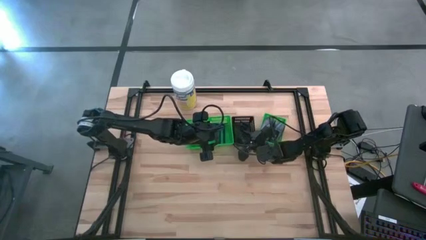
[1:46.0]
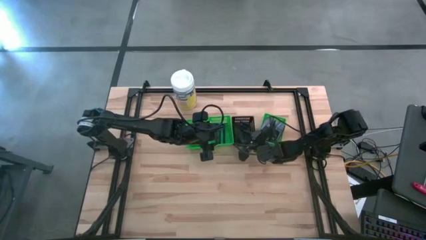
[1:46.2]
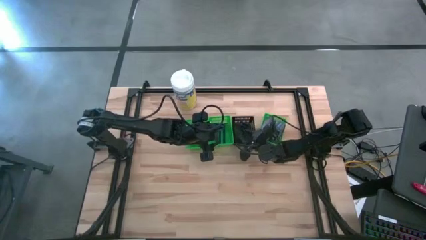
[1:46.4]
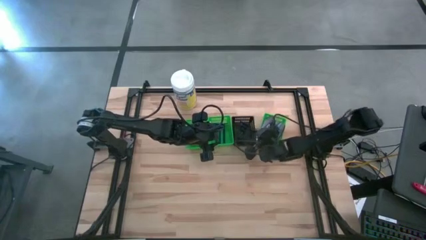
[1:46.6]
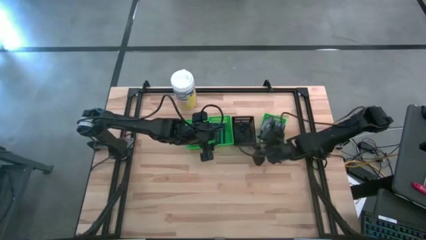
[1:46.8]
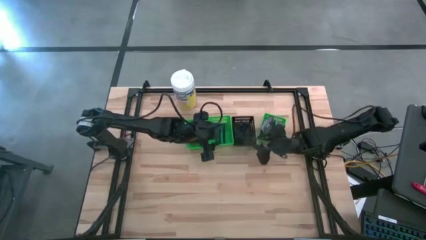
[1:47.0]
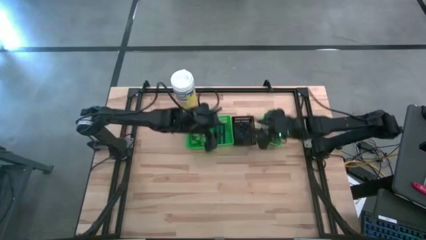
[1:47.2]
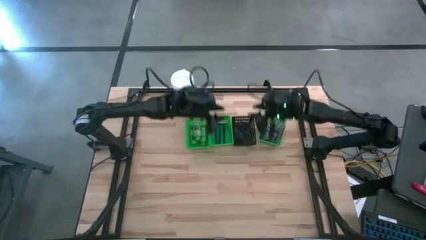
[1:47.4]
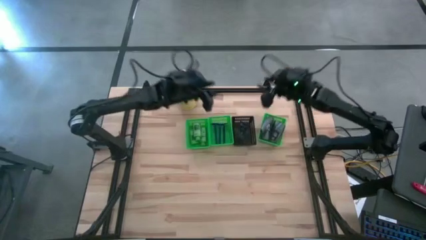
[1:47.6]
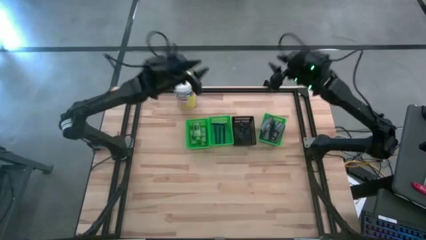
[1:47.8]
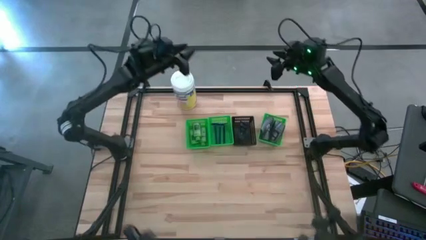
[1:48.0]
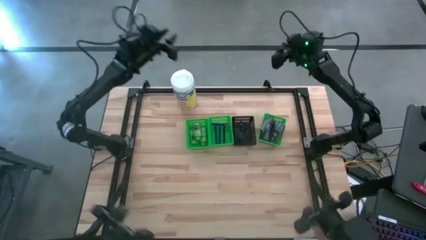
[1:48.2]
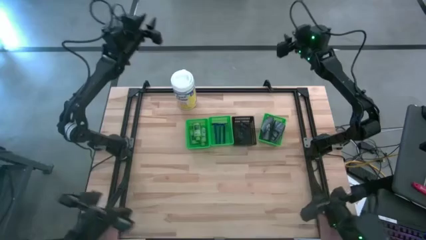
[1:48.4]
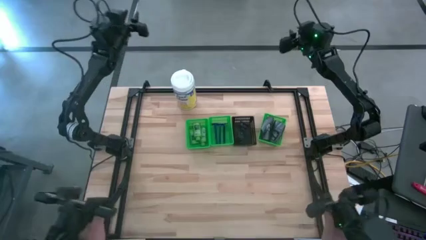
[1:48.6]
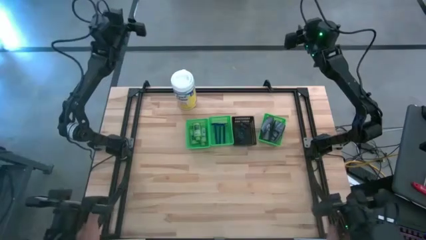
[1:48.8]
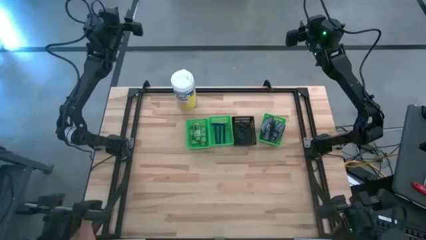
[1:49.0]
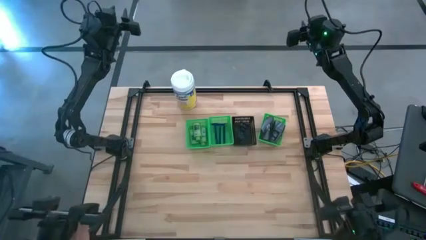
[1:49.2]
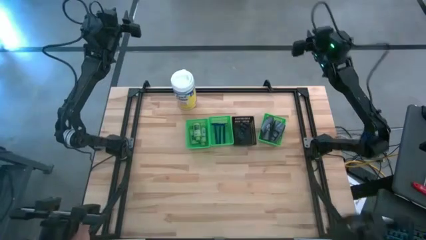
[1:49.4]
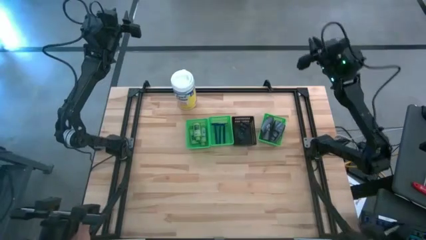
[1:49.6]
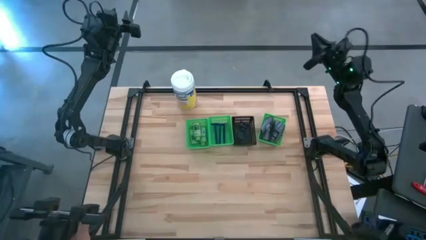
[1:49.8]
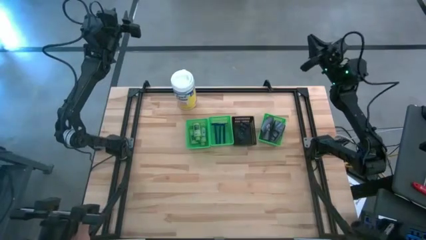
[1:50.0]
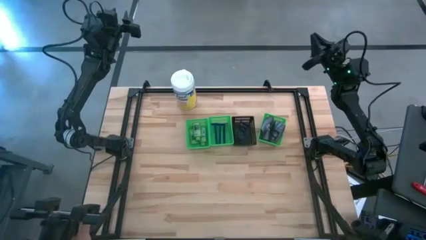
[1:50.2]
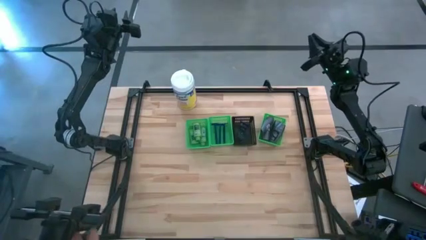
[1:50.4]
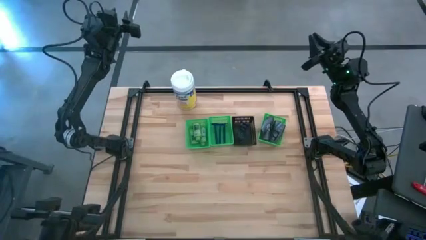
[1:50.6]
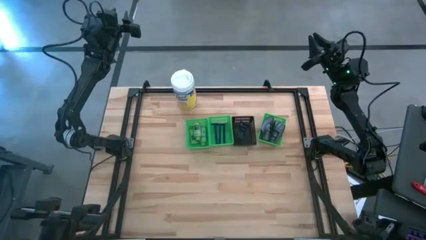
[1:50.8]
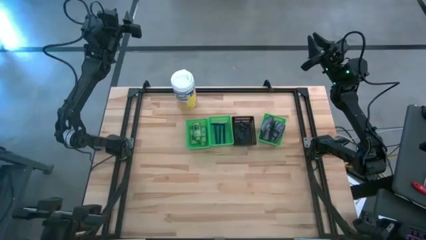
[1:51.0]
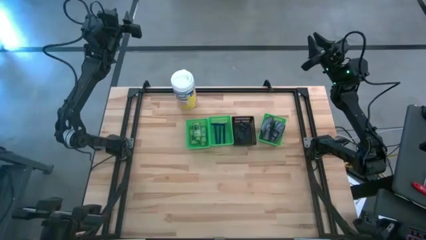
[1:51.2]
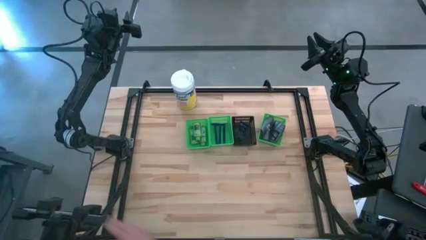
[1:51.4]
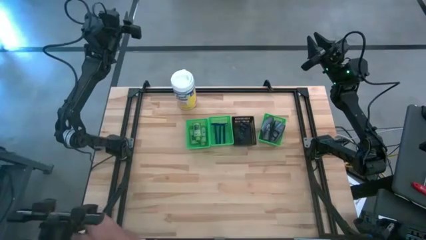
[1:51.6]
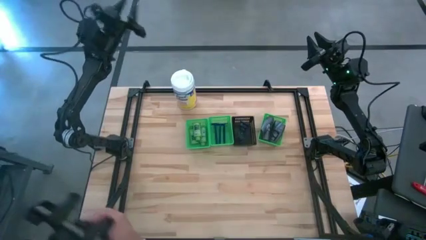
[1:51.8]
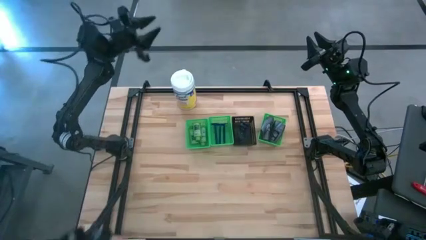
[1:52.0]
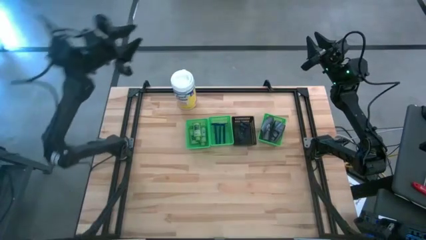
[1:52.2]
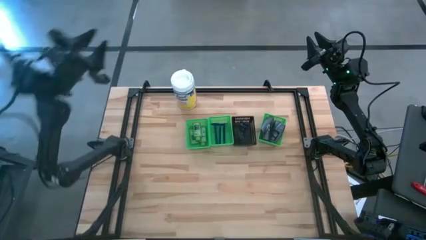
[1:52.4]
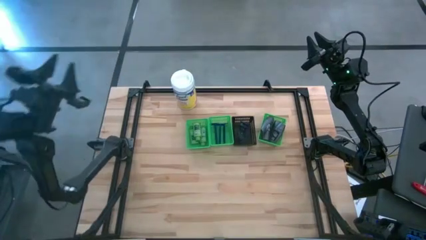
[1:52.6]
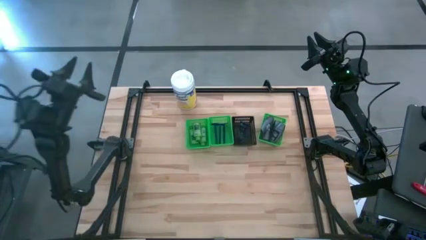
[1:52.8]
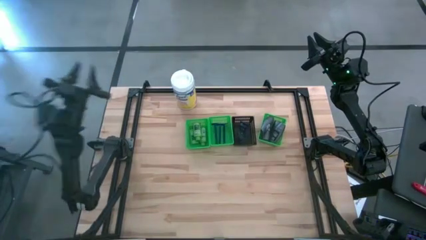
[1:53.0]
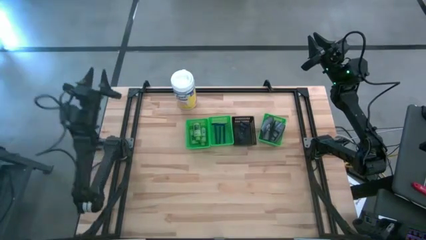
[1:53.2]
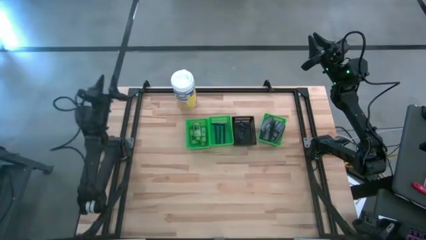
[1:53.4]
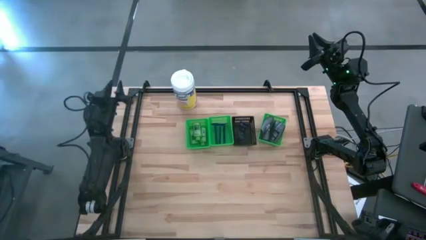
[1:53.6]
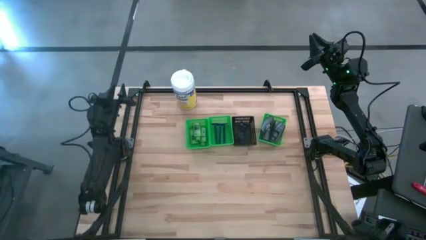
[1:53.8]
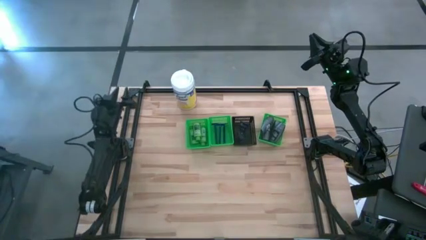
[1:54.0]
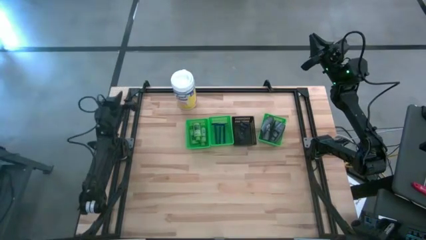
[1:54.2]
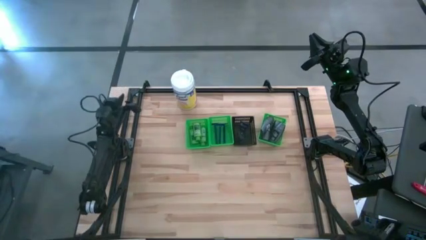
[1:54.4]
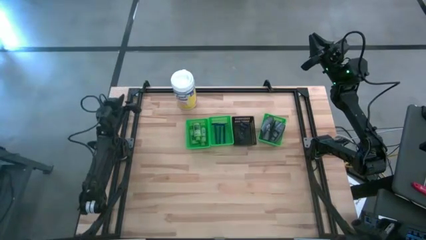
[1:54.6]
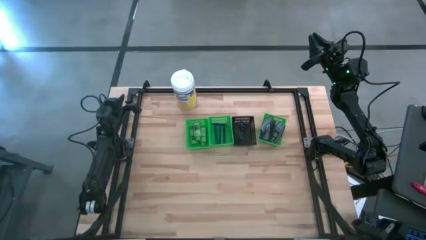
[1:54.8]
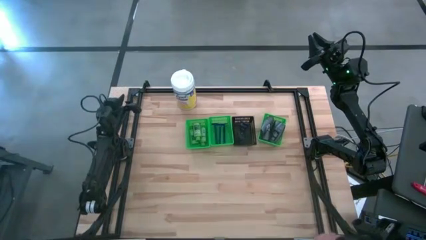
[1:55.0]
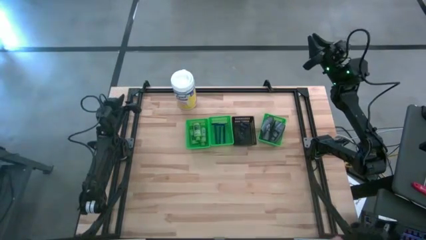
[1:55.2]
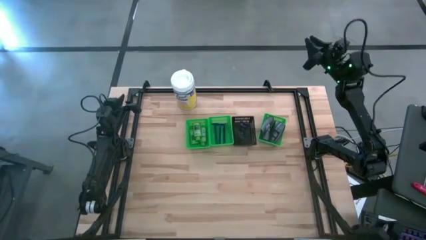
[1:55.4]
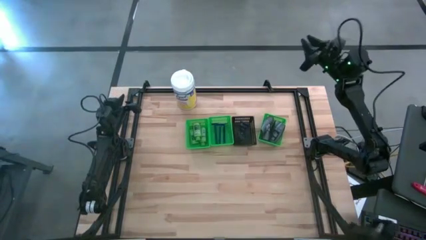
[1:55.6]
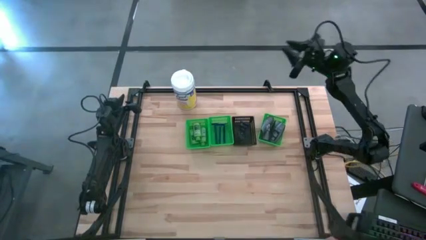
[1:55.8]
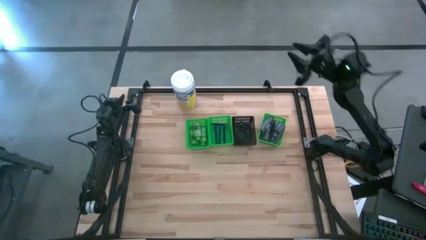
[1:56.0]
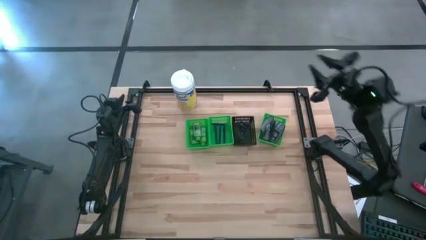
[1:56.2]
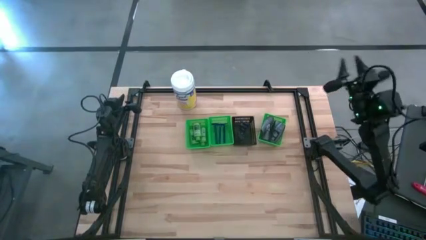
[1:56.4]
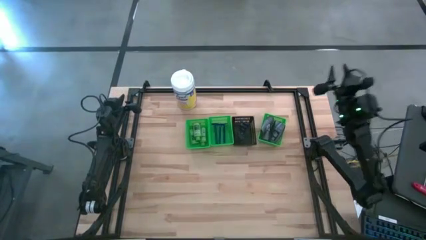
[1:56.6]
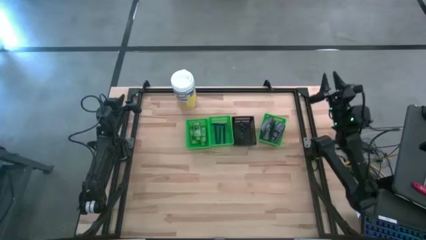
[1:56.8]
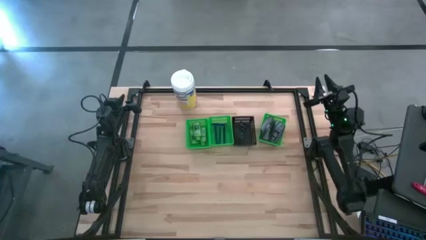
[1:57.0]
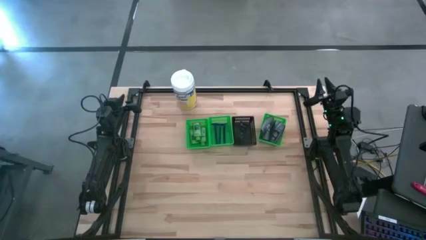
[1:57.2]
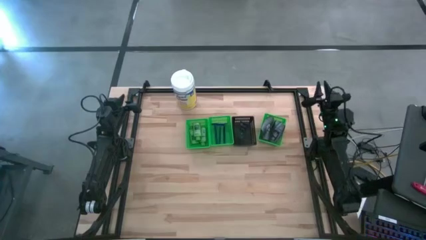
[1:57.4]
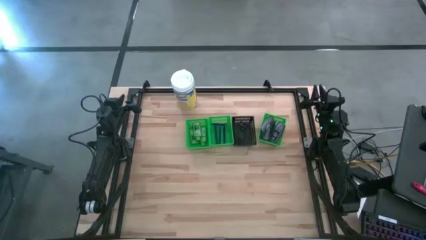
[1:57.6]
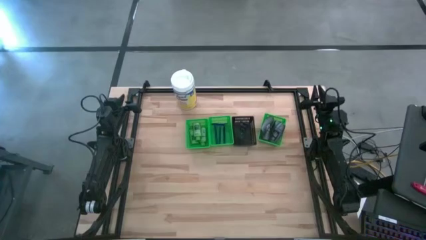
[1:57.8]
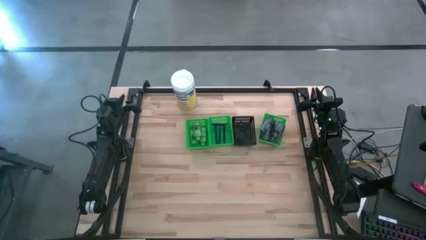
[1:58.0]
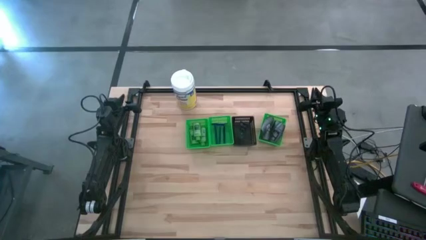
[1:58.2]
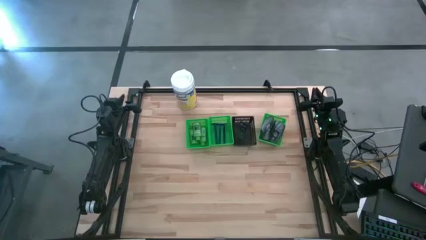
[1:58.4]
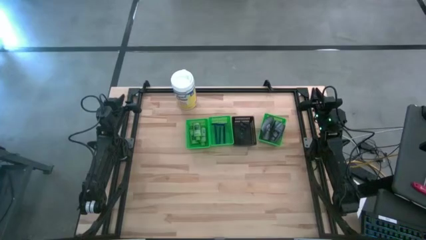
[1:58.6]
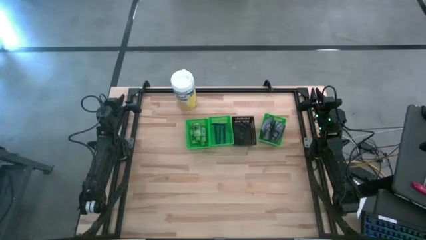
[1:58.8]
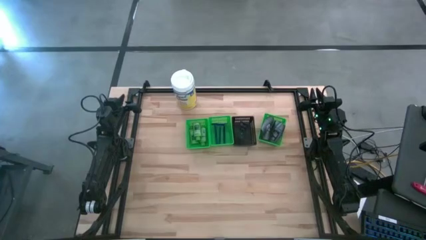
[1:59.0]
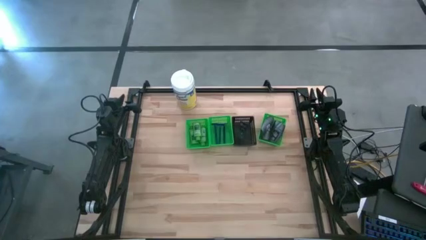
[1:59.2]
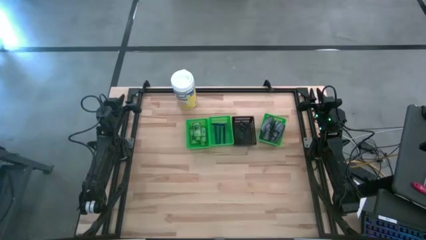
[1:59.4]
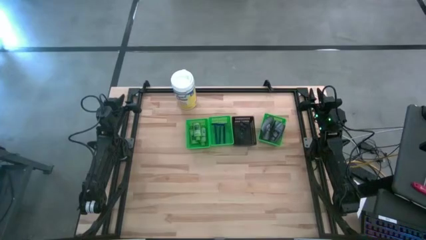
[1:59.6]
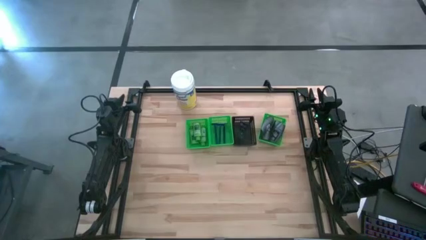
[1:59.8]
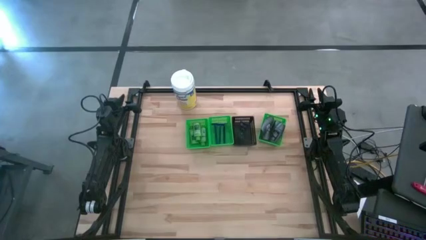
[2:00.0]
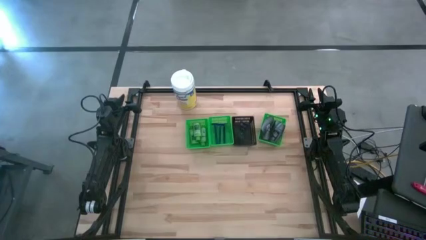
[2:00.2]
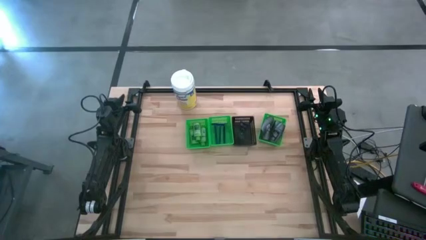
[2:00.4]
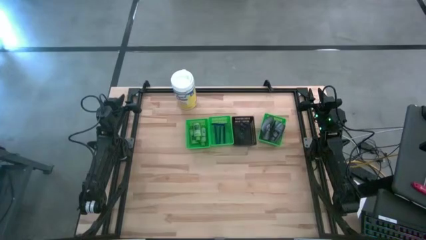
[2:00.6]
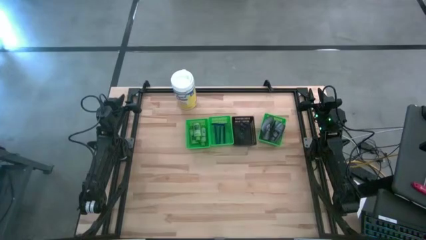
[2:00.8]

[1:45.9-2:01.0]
Task: Pick & Place Travel size toiletries
Return to Home Position
